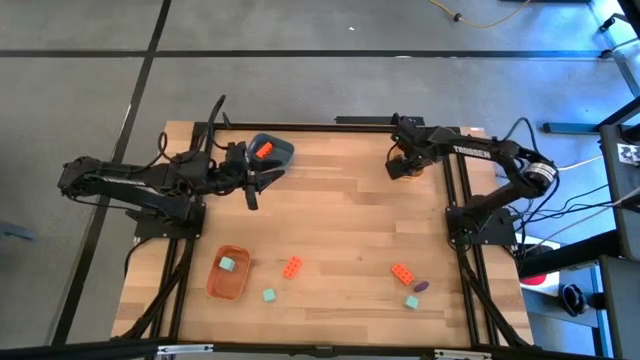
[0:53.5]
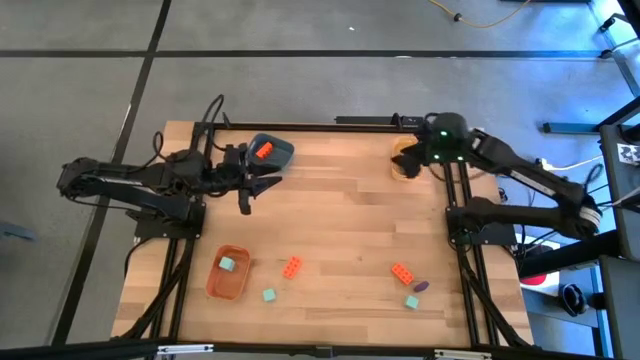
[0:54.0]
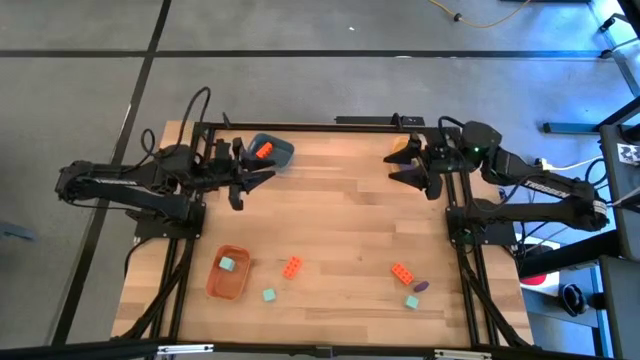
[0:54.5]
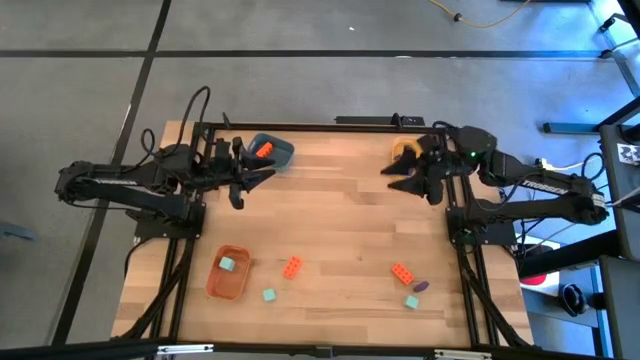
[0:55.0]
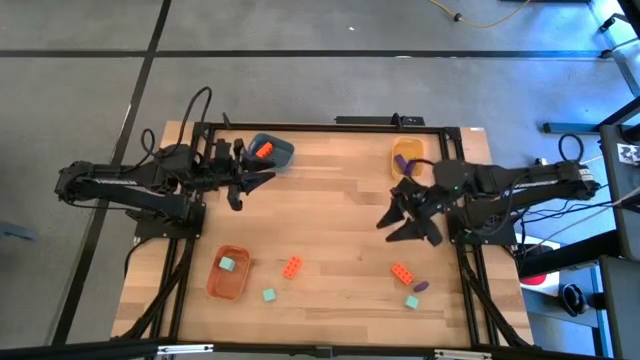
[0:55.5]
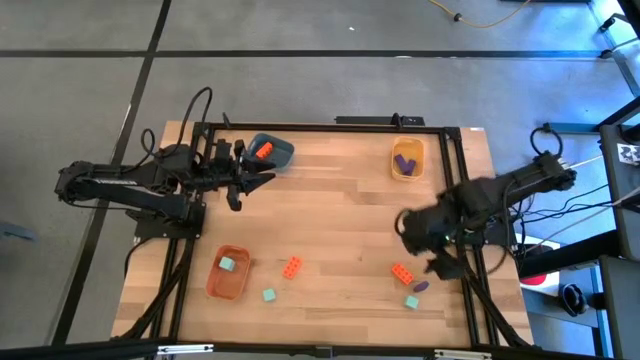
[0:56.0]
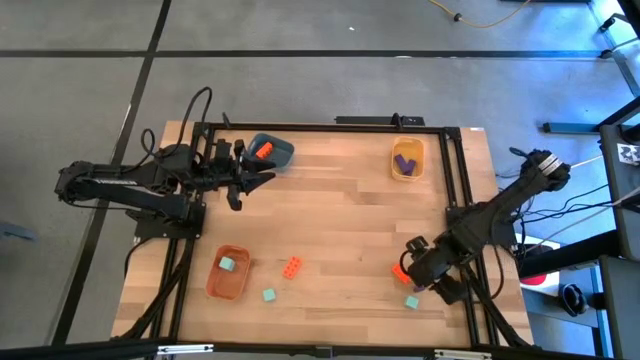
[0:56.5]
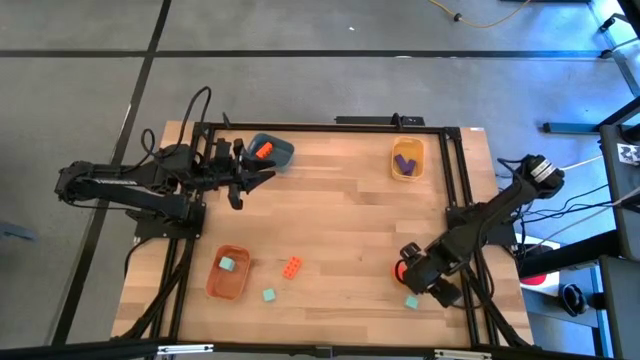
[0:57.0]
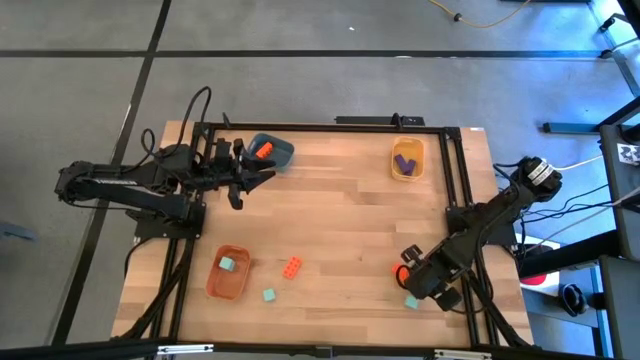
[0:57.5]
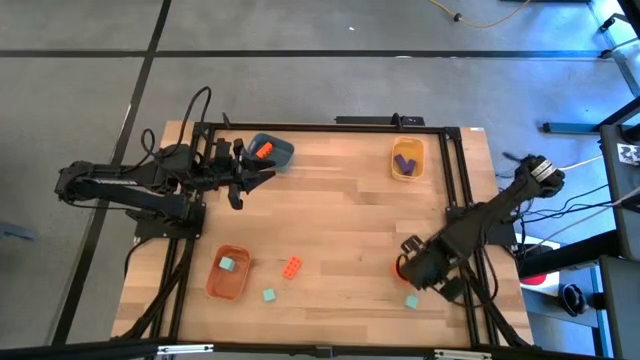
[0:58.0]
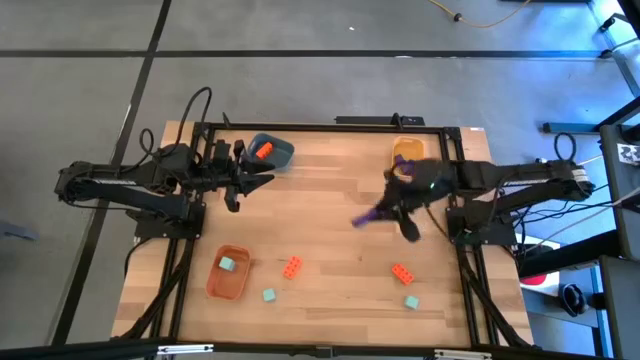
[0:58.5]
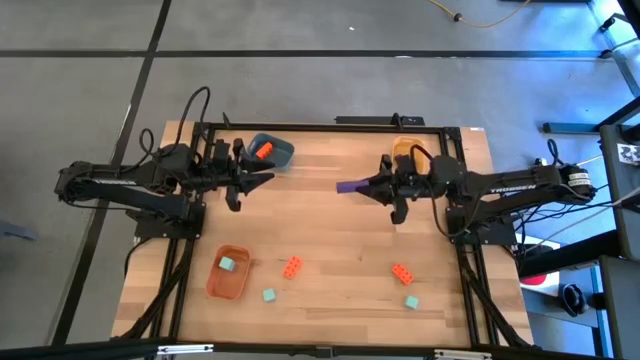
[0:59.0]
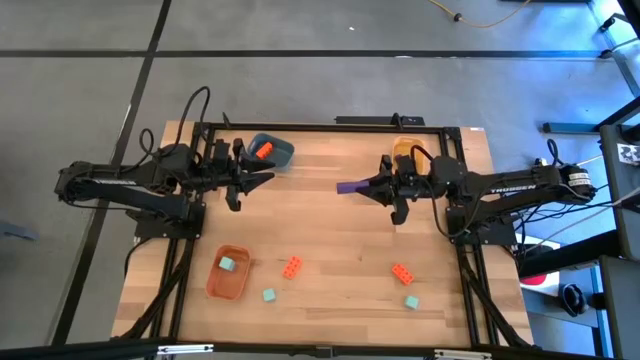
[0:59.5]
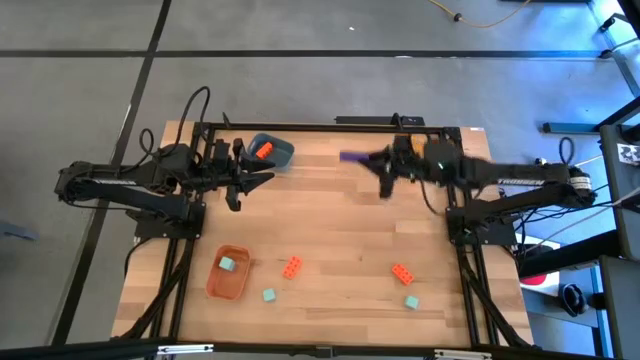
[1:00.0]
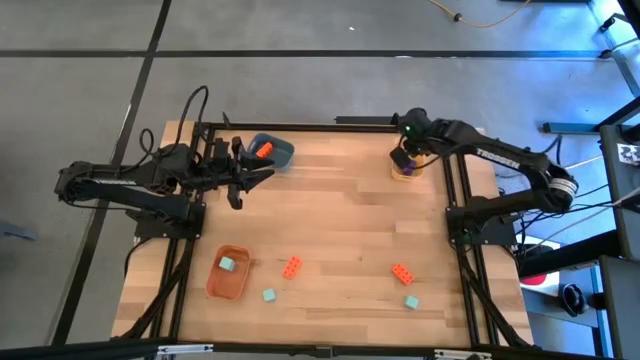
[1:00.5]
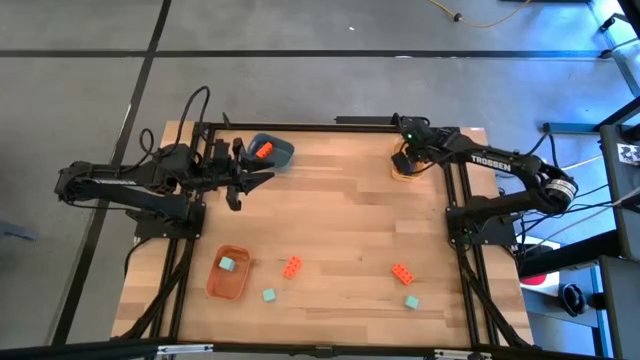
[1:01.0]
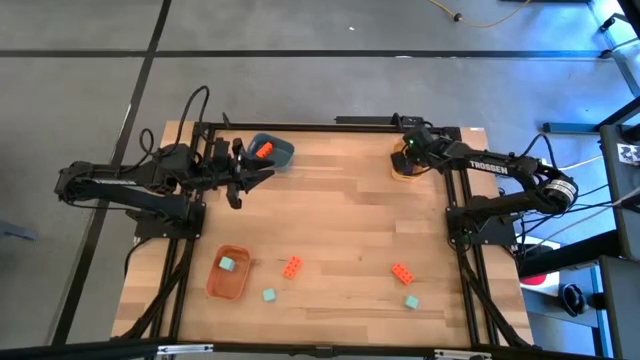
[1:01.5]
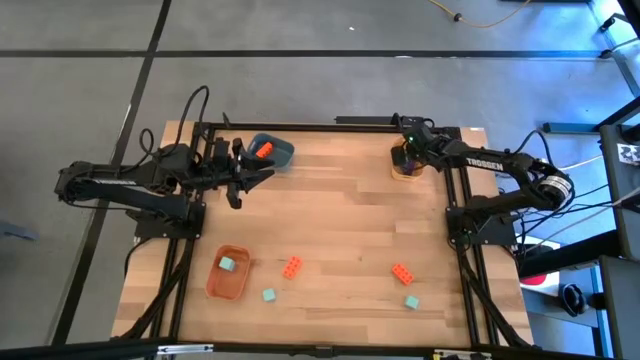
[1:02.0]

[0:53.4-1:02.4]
Task: Sort & place blocks by color
Put the blue block into the yellow bin

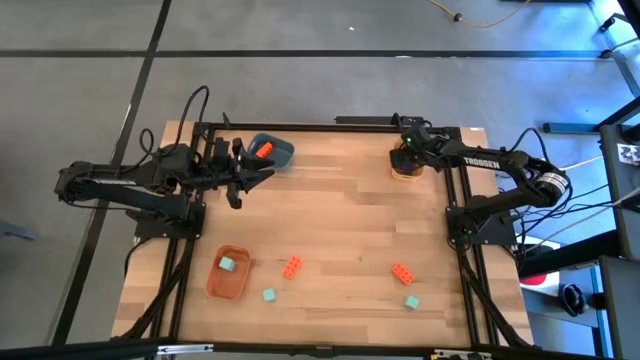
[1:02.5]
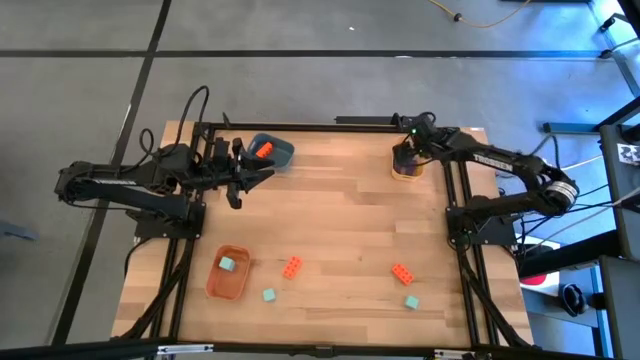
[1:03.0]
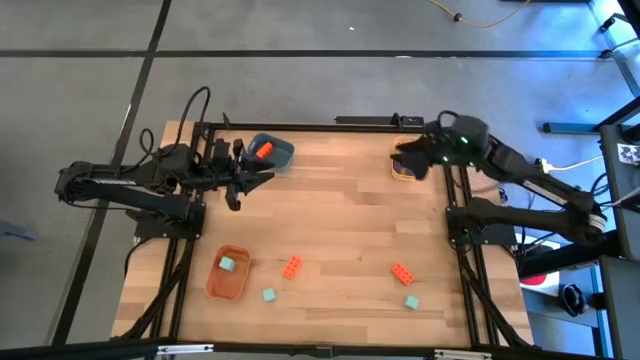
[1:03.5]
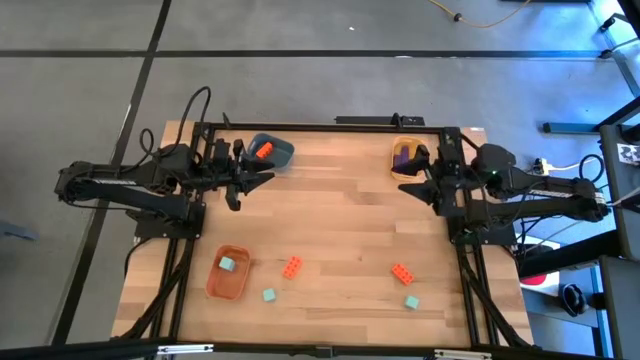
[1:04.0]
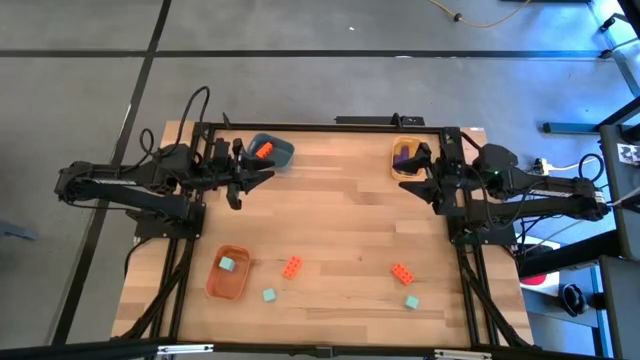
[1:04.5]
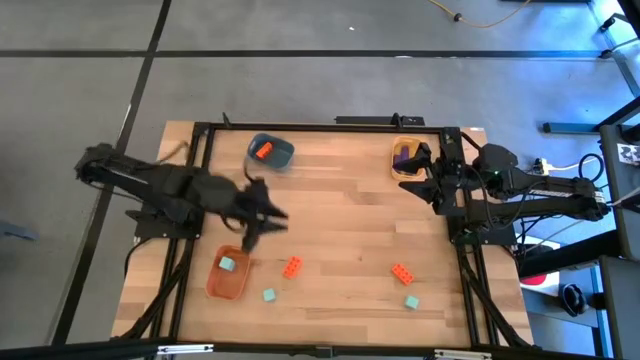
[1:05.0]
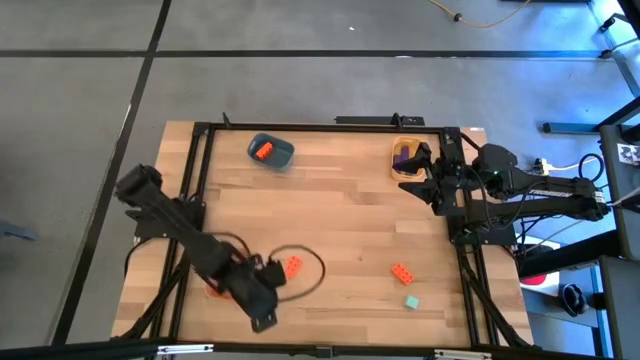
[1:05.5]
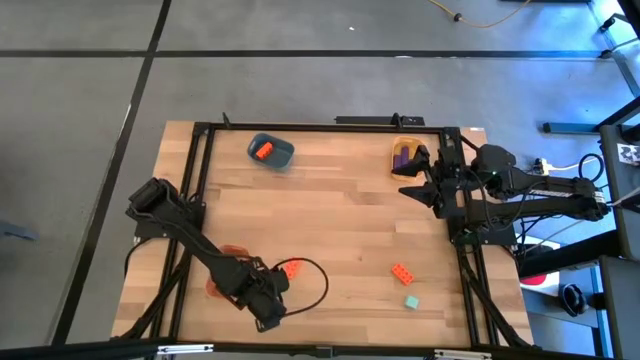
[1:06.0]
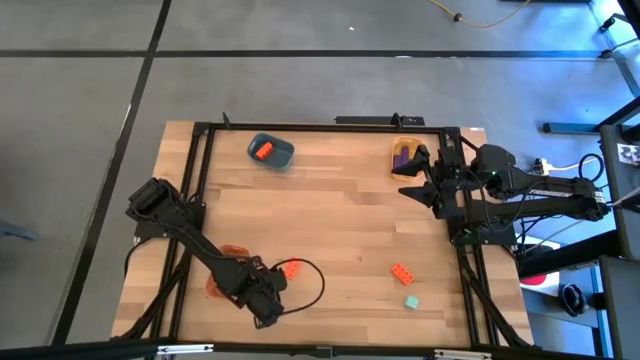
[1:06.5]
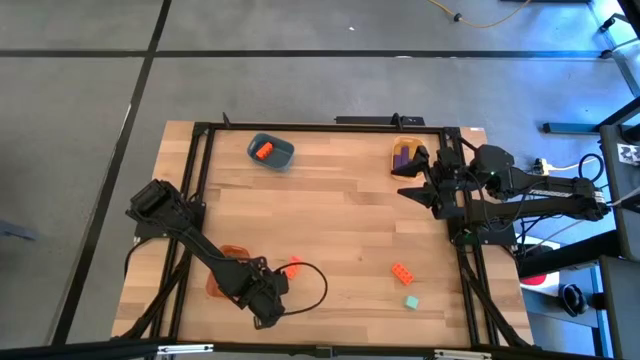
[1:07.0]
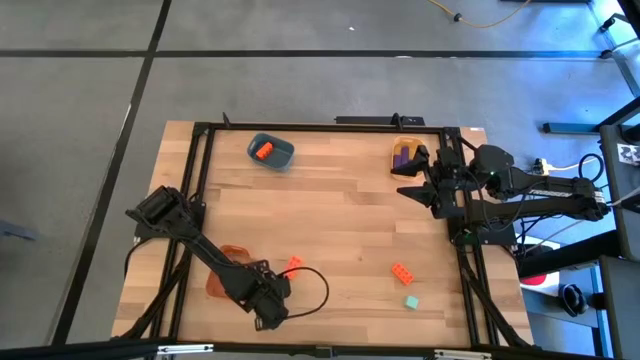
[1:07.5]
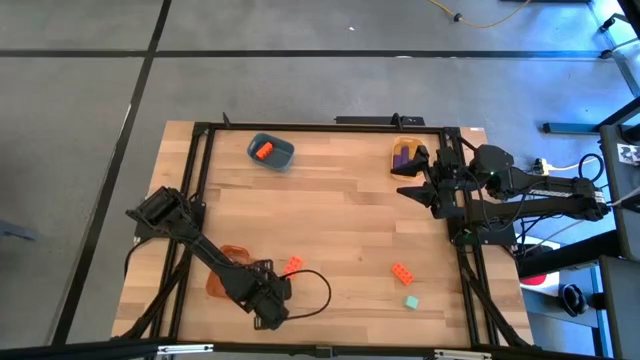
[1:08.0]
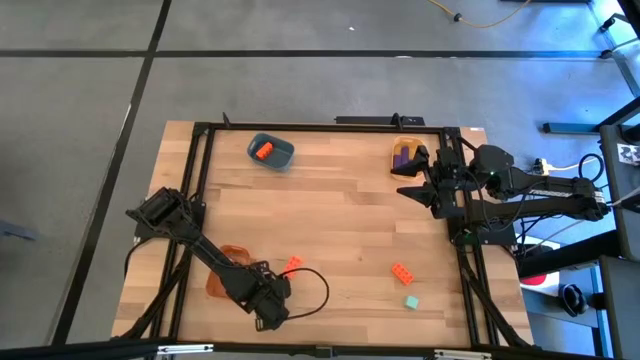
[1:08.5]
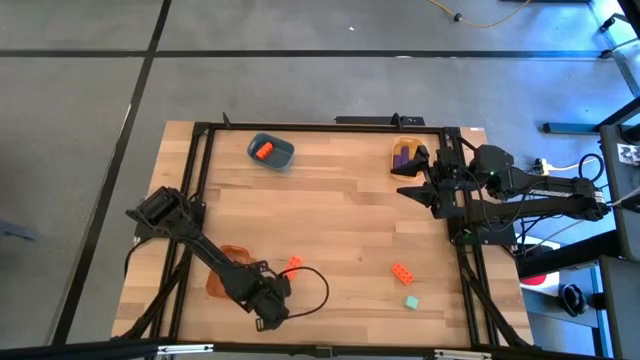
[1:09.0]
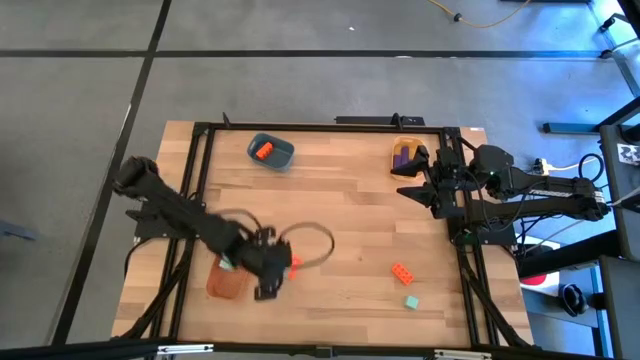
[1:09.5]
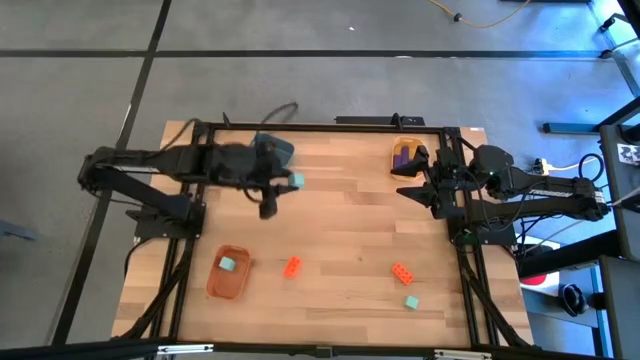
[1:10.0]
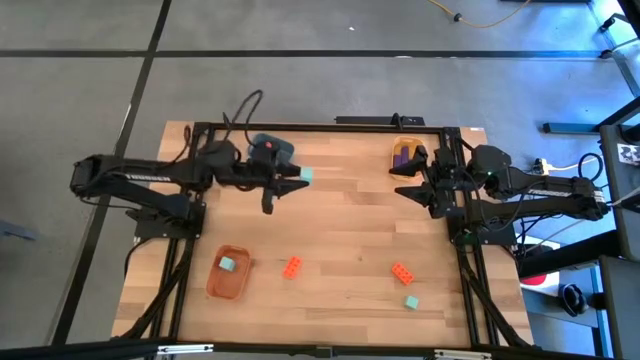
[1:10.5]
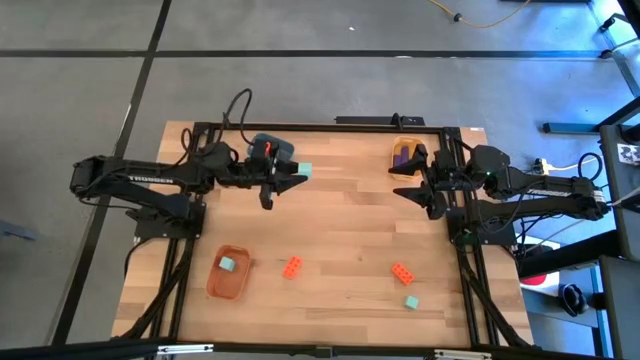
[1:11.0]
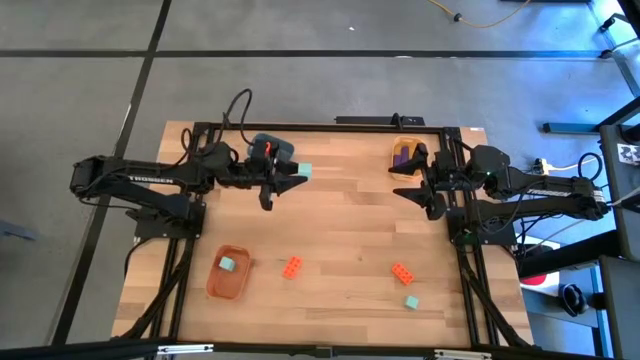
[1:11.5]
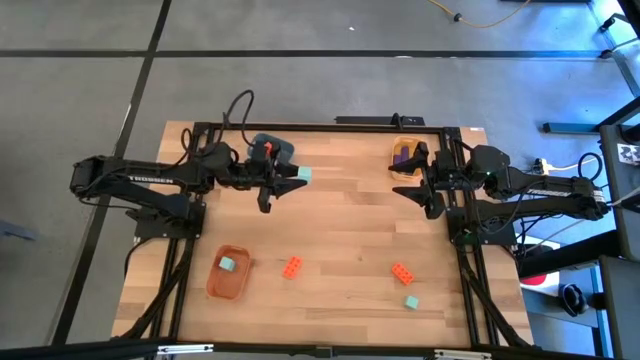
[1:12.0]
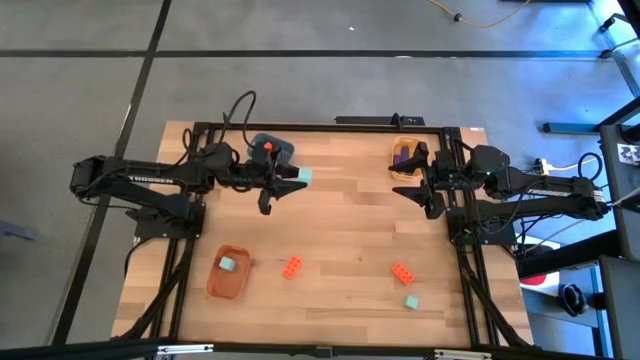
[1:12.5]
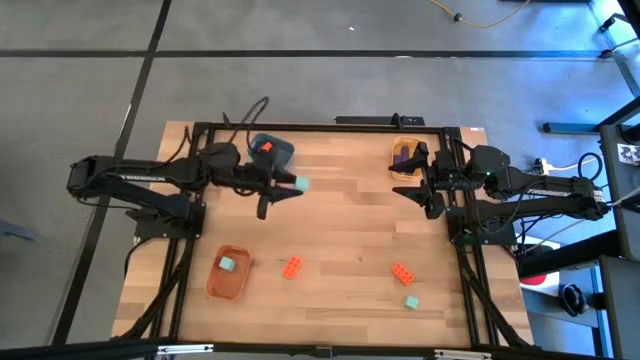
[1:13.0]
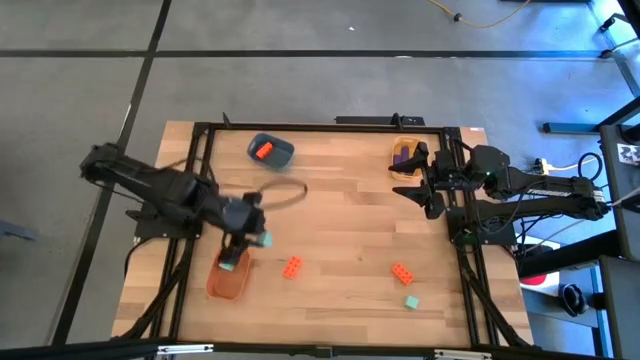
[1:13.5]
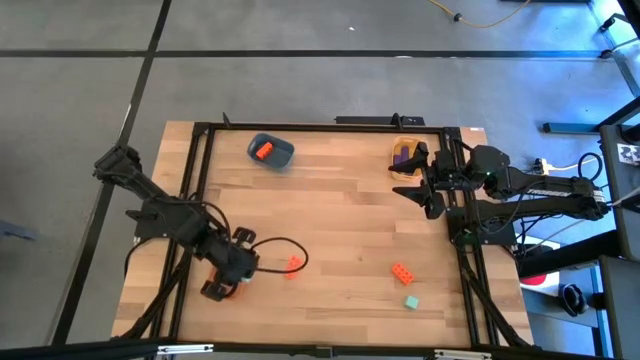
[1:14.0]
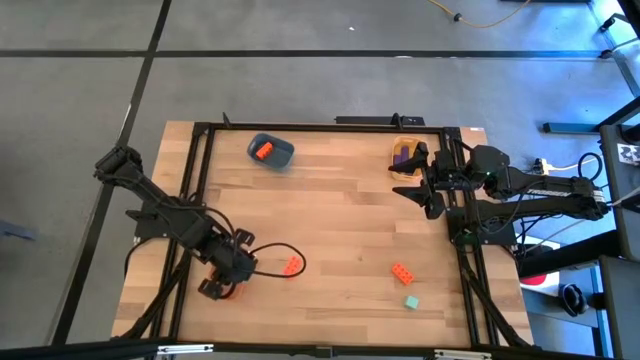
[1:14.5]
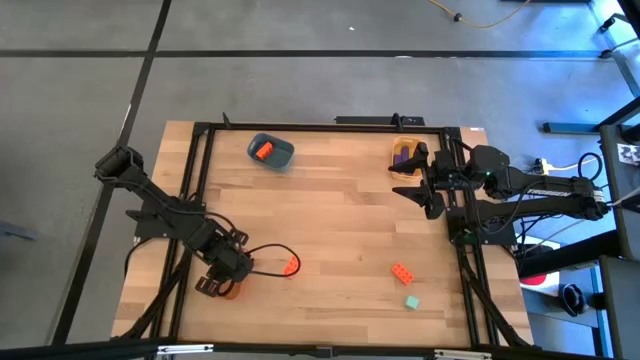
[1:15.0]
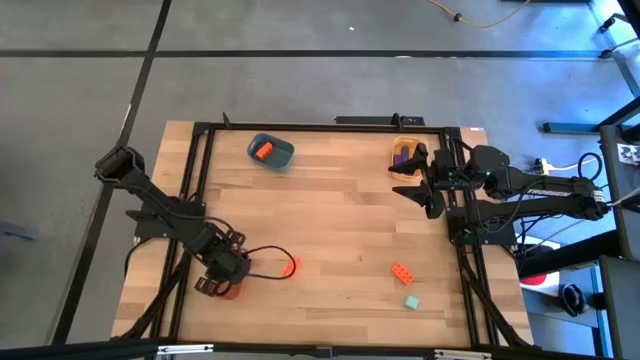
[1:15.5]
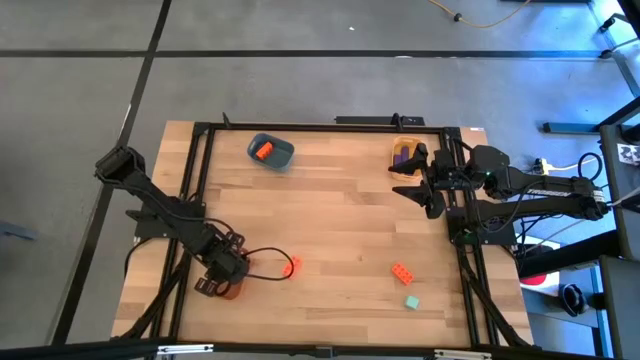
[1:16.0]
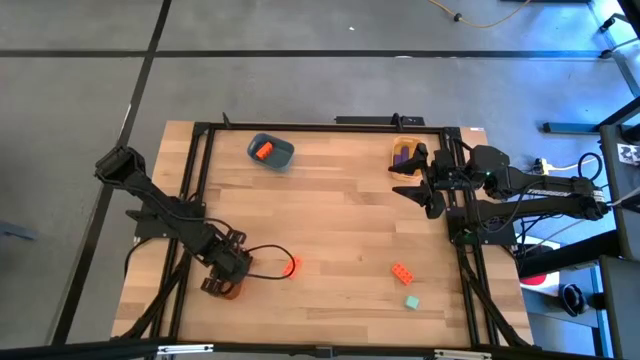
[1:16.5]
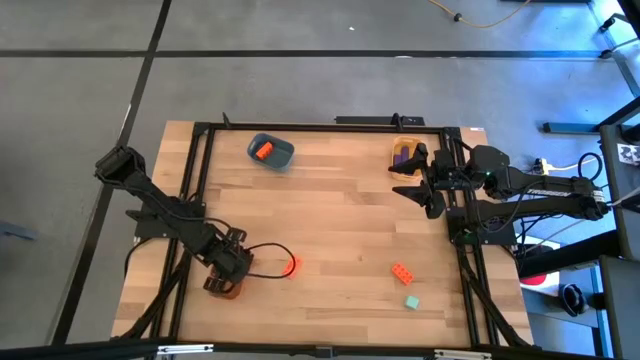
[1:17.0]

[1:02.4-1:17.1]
Put the left light blue block into the orange bin
